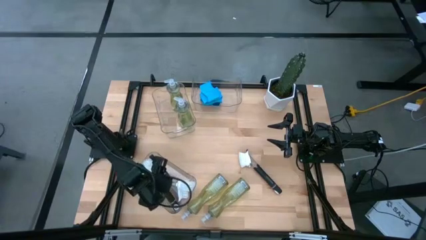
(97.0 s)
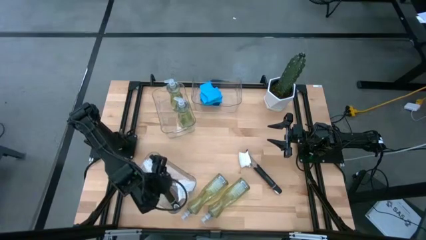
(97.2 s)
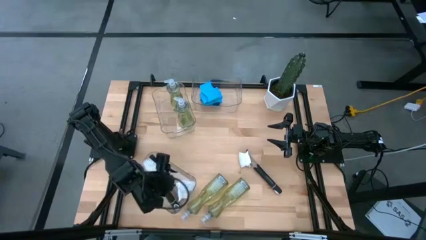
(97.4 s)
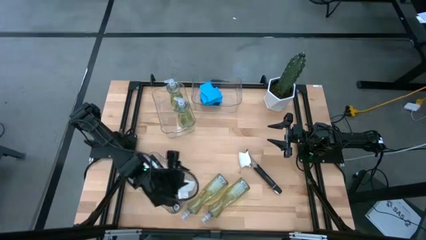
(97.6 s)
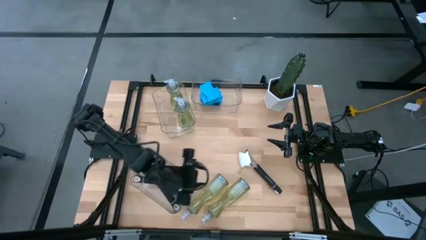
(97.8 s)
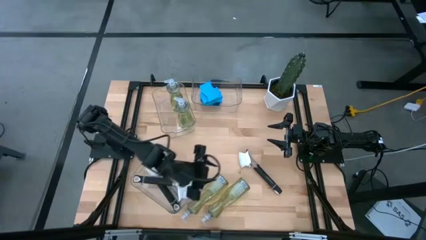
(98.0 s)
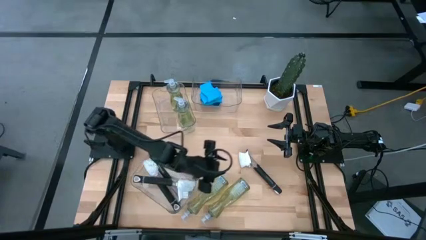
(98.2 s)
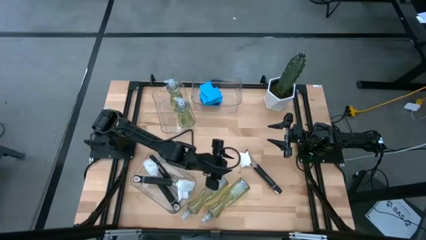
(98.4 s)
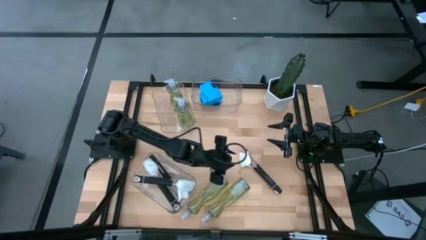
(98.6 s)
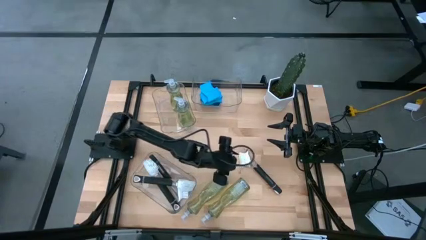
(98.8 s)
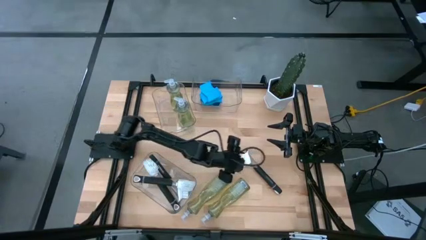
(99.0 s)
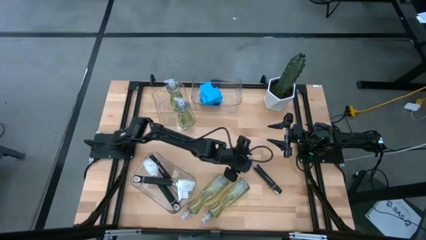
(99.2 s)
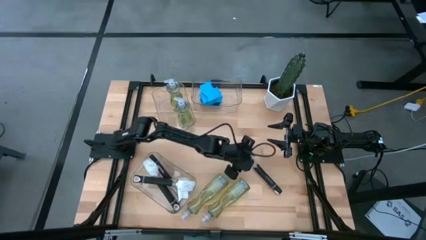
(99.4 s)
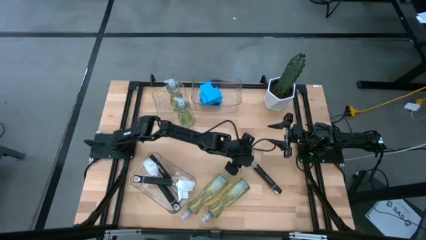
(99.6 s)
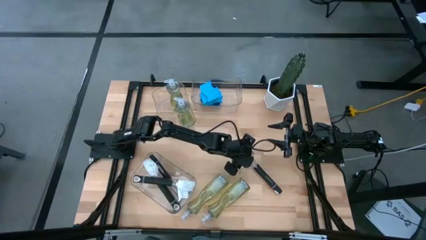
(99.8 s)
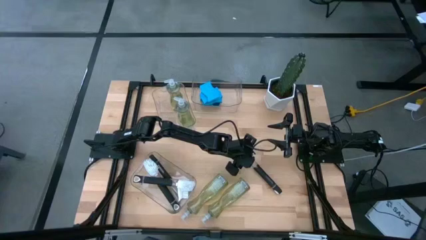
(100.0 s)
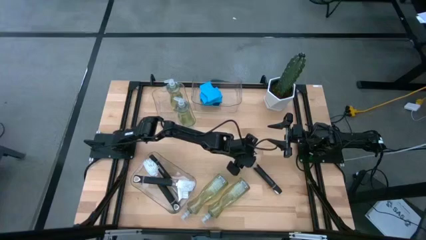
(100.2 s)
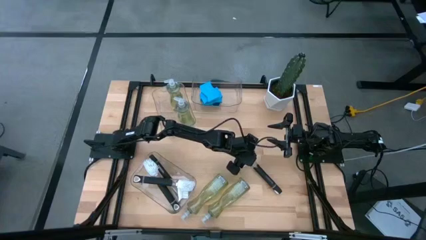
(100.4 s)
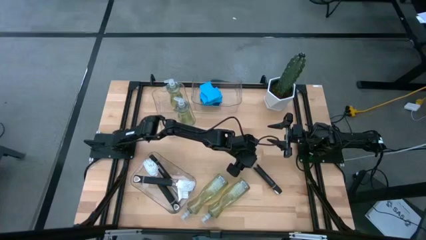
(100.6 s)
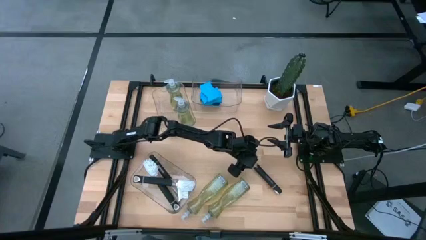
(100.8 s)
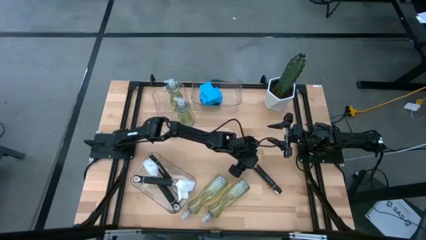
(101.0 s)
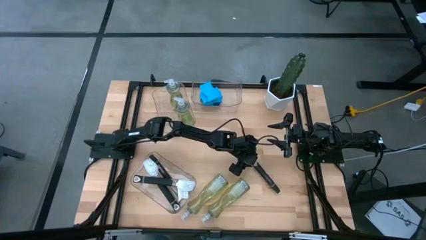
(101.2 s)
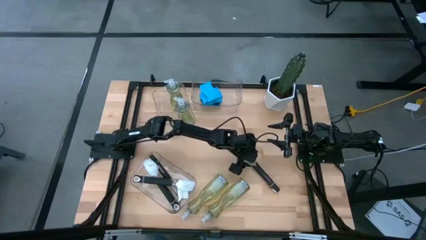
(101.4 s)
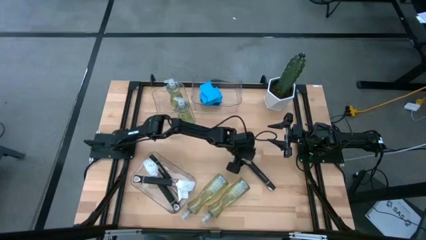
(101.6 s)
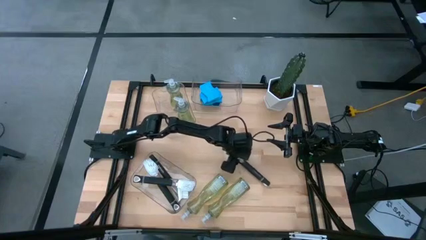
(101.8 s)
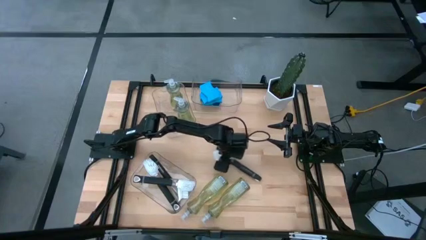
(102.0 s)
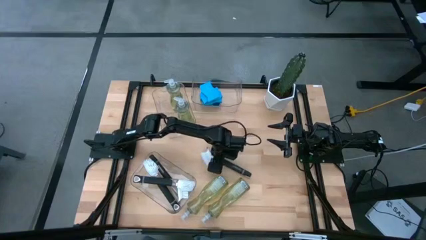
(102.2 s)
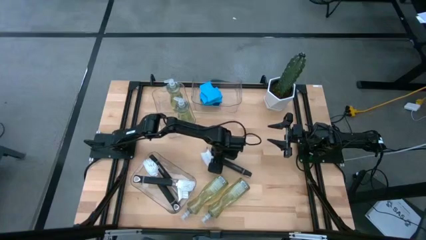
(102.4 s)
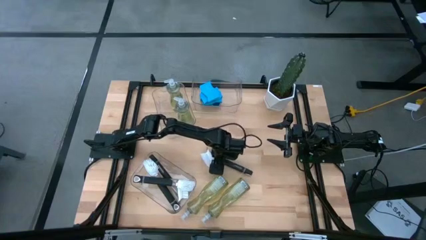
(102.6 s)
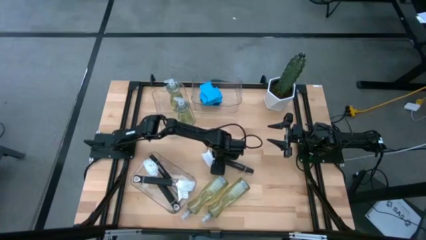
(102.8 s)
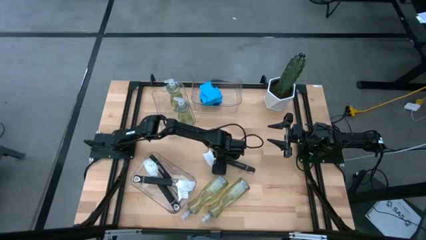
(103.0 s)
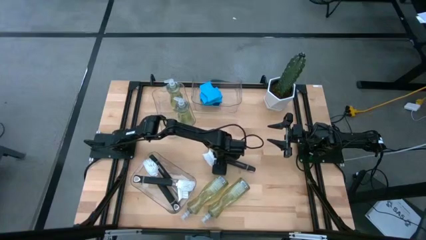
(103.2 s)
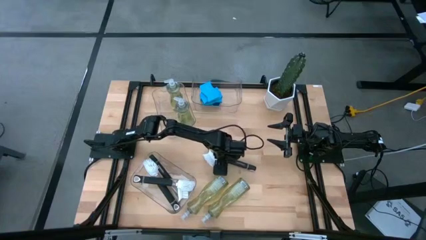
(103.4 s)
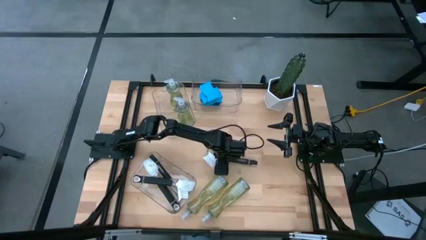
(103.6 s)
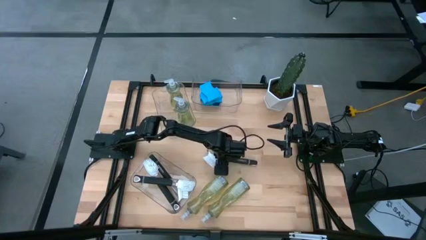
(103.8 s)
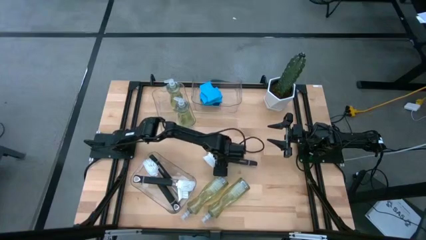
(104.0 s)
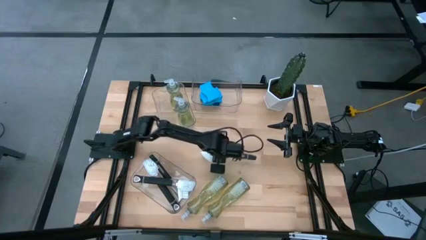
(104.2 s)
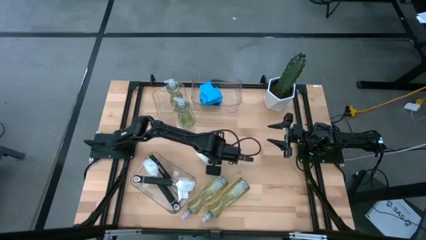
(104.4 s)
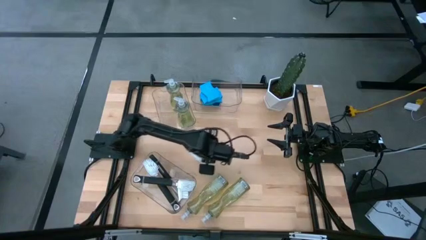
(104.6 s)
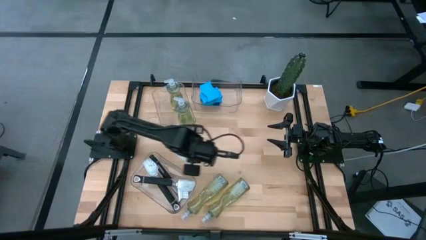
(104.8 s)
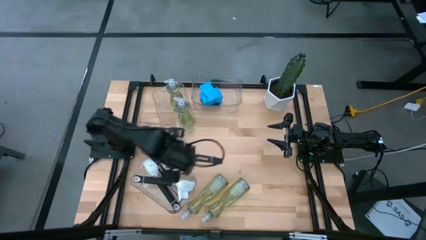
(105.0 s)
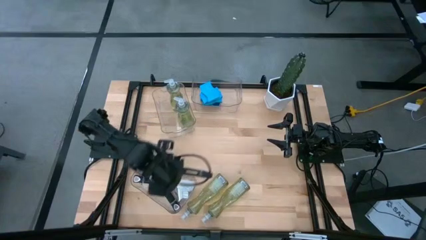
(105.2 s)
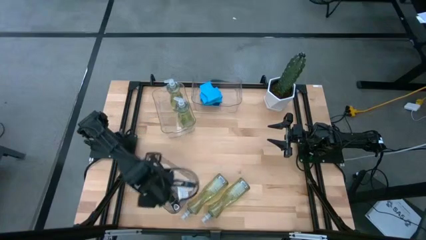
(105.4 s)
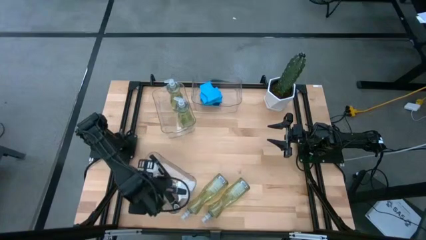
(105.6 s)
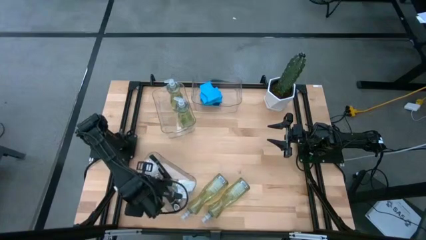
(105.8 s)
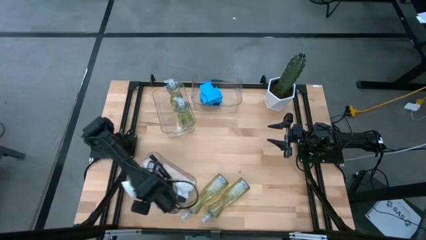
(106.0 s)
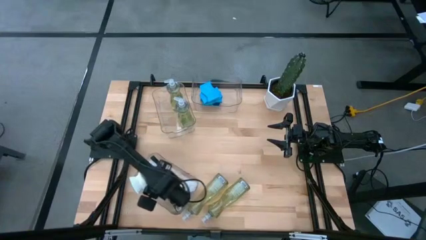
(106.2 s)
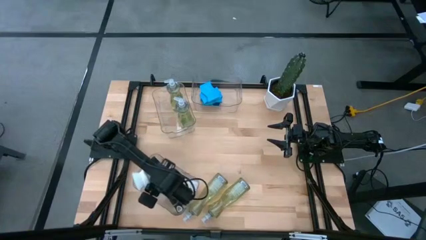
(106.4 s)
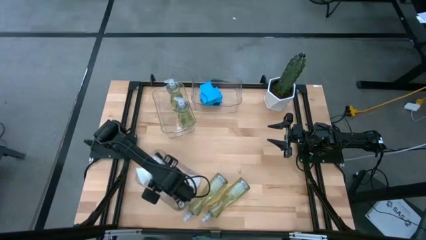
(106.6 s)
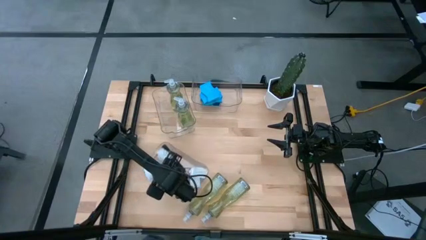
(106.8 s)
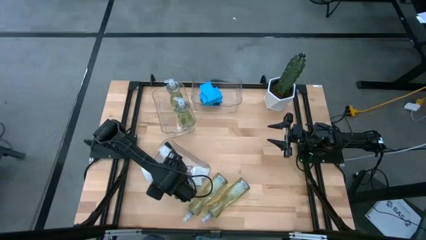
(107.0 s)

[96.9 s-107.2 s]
Task: Pick & Place Kitchen Sink Supplies
Put the dish brush into the bottom transparent bin

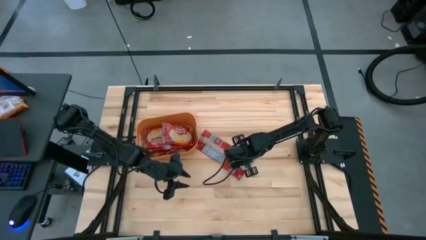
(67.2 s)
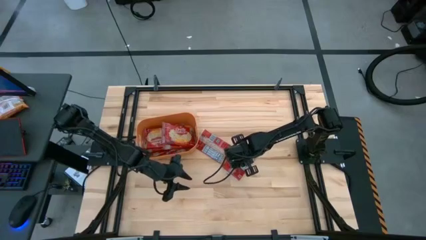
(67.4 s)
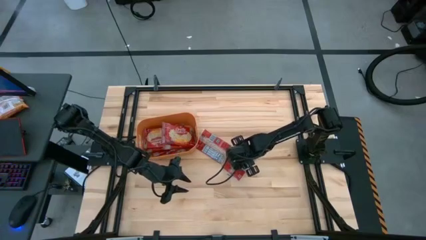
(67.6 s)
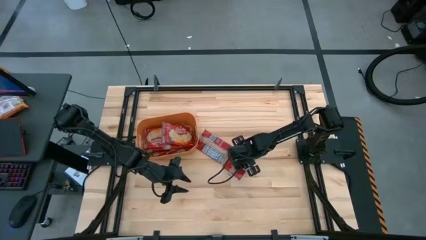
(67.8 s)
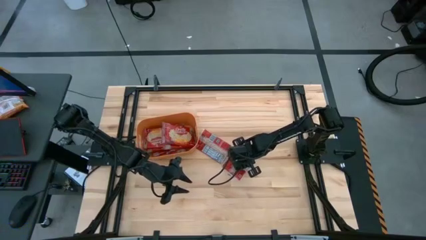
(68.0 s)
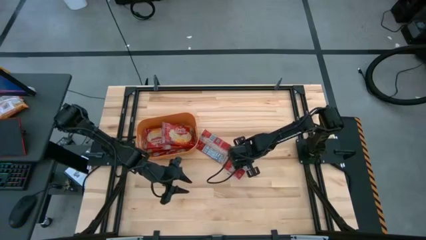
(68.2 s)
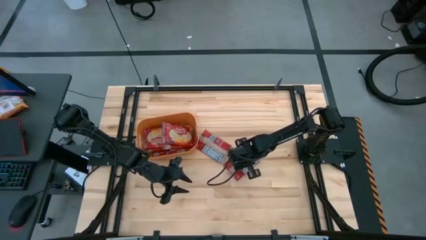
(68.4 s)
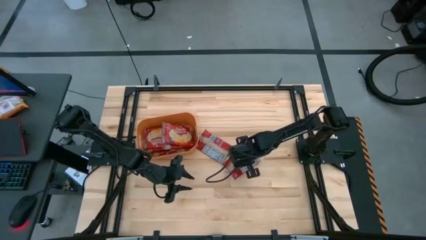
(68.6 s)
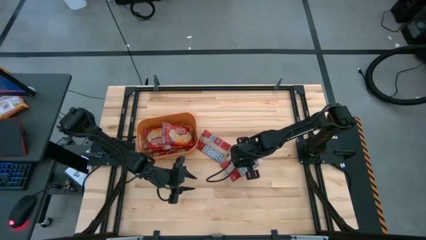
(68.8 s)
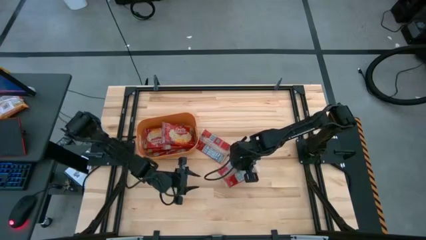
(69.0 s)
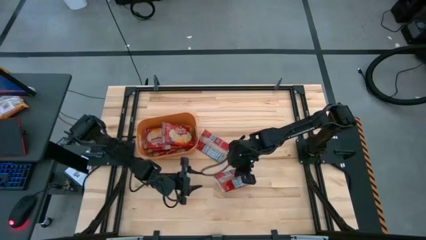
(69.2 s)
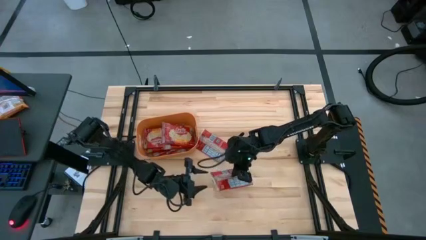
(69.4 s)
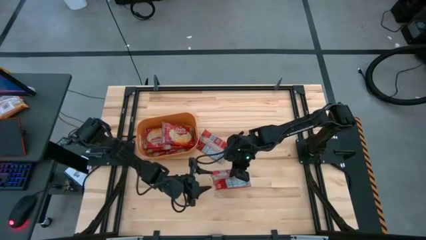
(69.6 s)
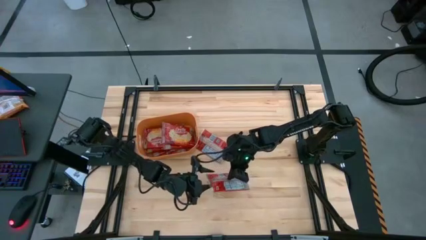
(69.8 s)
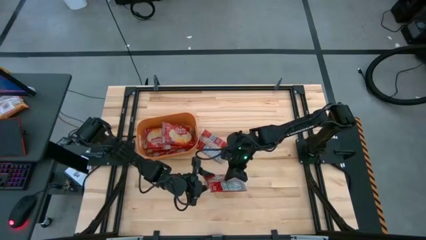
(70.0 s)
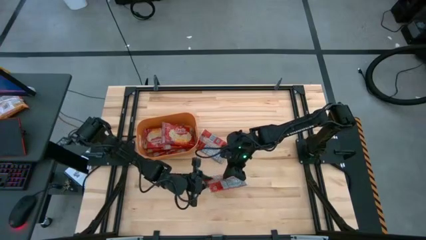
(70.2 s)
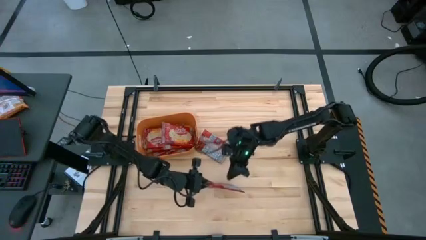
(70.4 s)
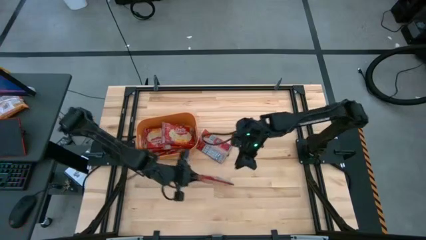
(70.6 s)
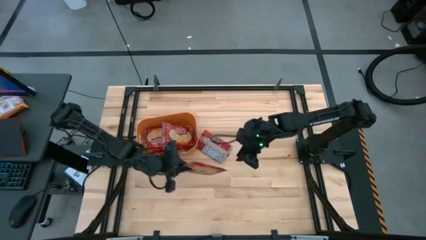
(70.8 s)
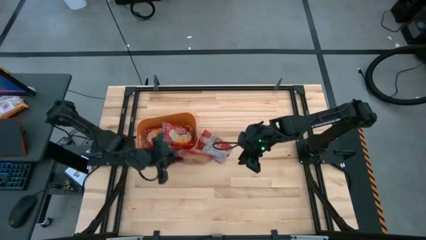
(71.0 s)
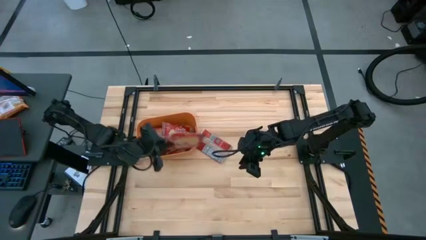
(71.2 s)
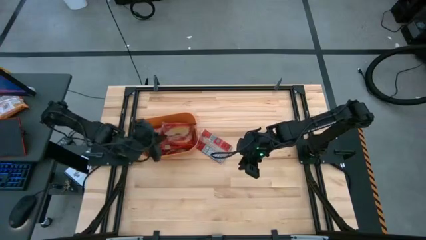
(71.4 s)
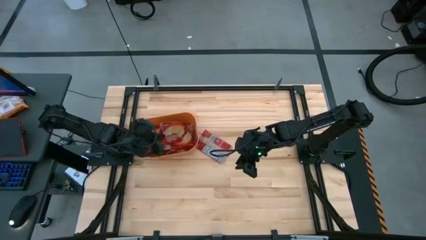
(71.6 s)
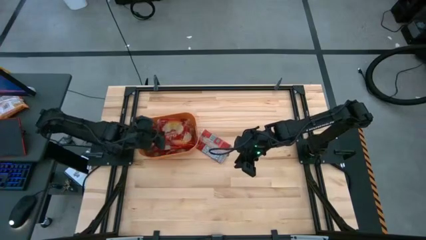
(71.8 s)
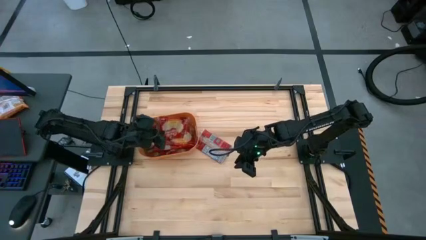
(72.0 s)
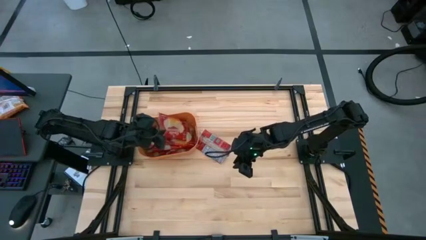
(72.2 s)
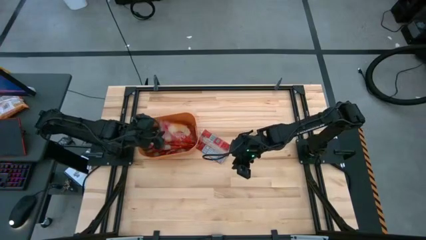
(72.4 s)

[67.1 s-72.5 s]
Task: Sort popcorn bags into baskets
Put the red popcorn bag into the orange bin
